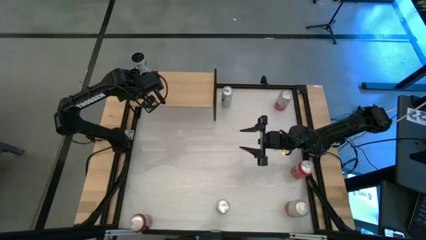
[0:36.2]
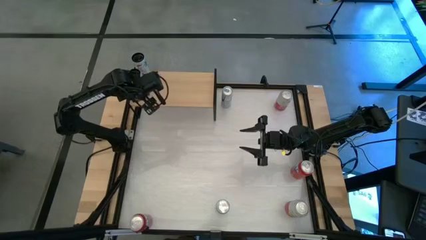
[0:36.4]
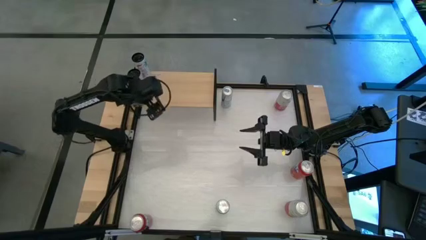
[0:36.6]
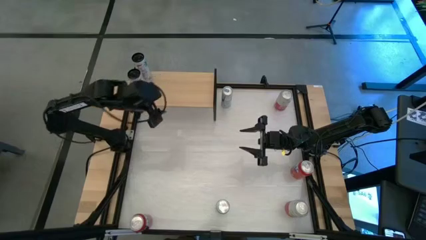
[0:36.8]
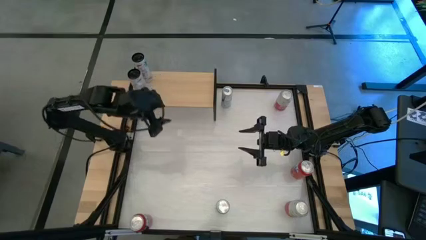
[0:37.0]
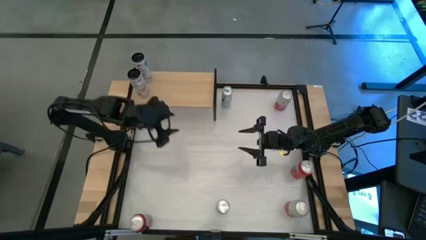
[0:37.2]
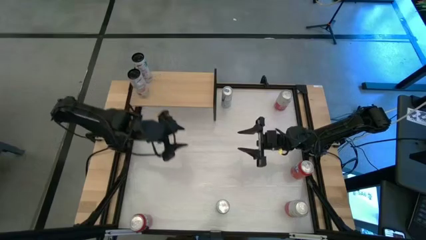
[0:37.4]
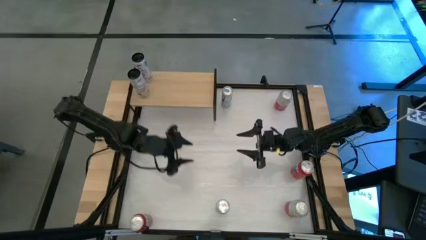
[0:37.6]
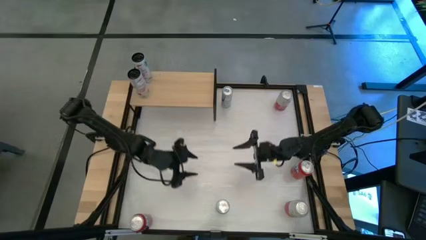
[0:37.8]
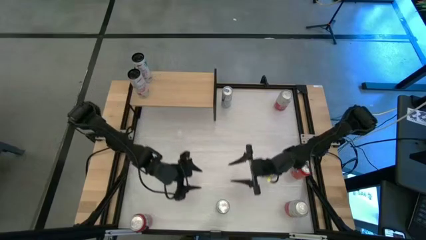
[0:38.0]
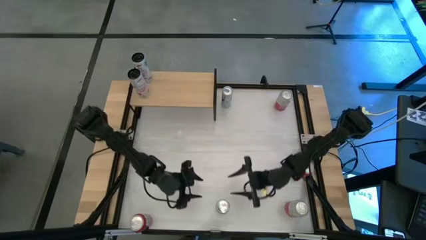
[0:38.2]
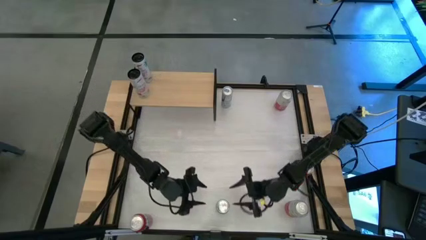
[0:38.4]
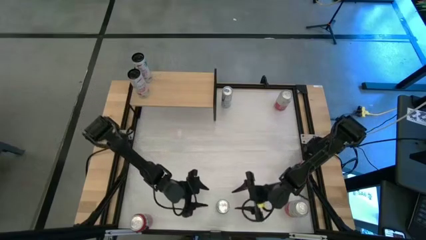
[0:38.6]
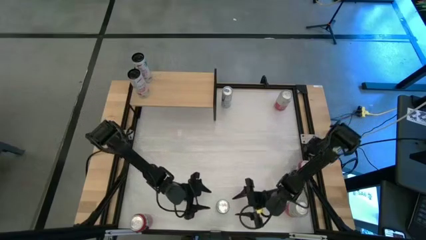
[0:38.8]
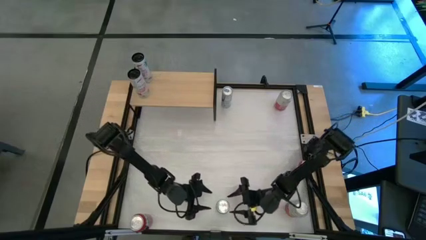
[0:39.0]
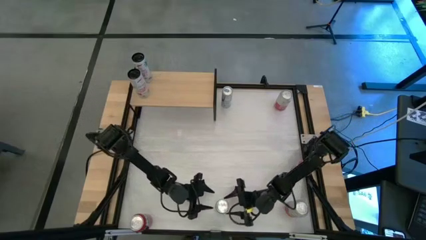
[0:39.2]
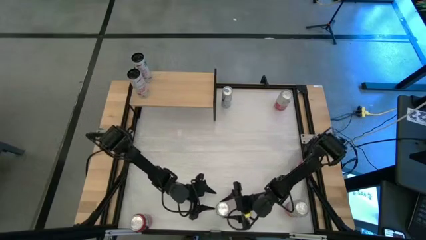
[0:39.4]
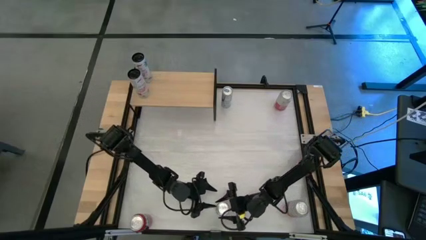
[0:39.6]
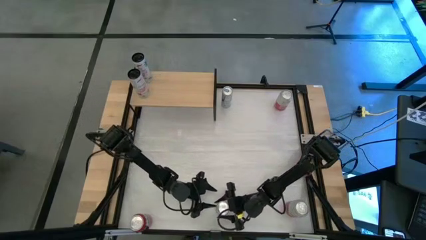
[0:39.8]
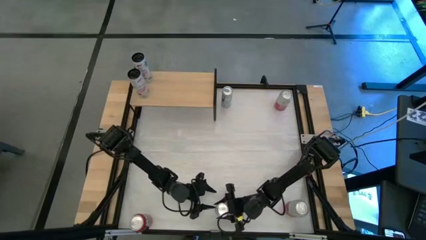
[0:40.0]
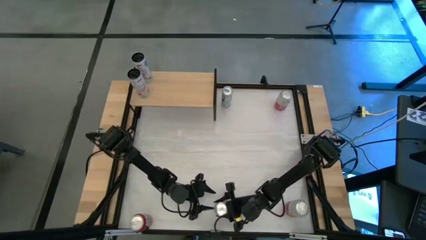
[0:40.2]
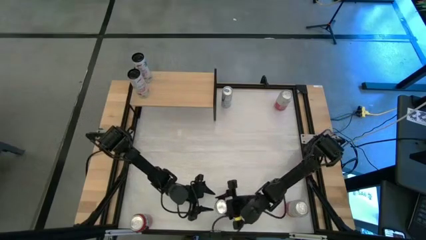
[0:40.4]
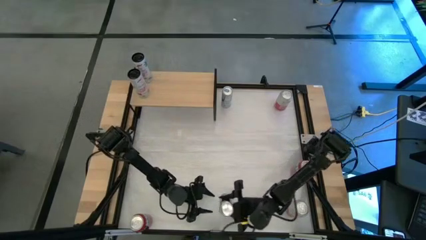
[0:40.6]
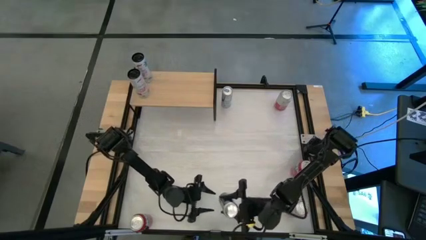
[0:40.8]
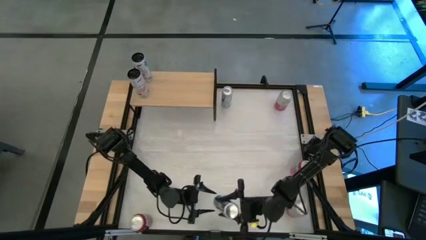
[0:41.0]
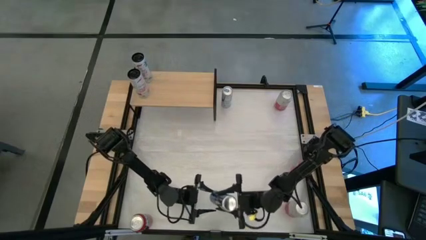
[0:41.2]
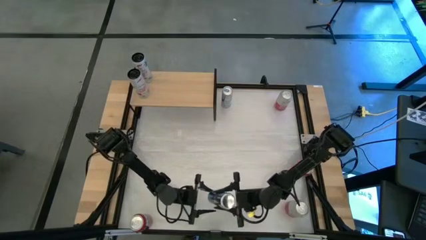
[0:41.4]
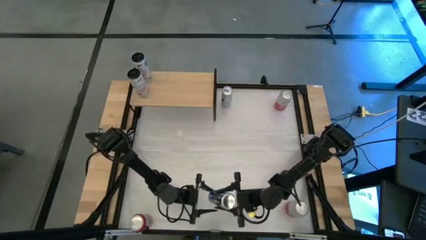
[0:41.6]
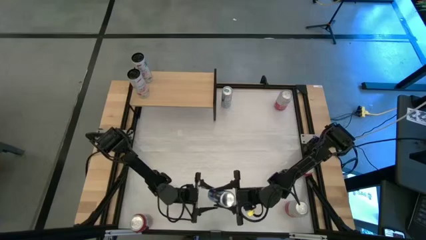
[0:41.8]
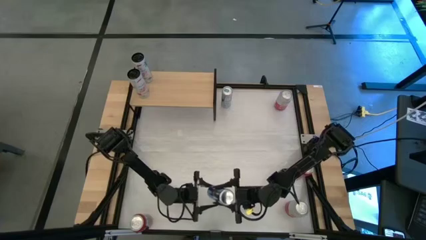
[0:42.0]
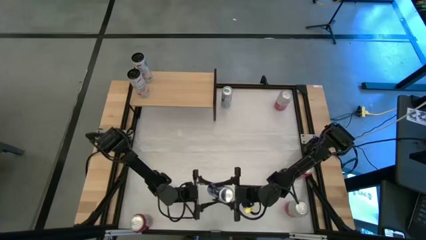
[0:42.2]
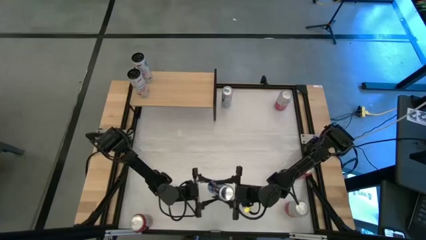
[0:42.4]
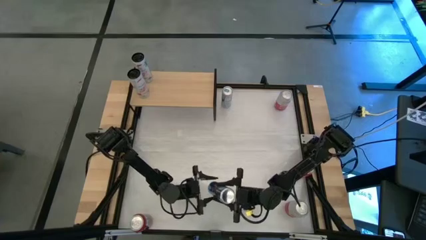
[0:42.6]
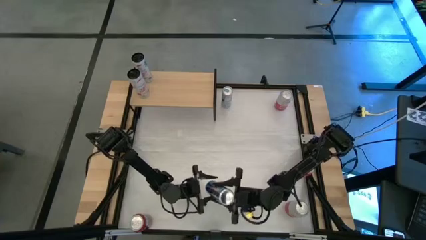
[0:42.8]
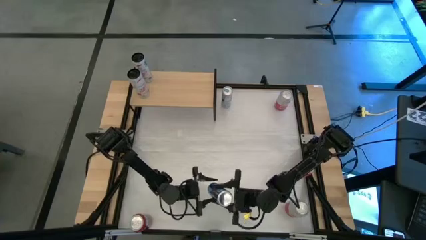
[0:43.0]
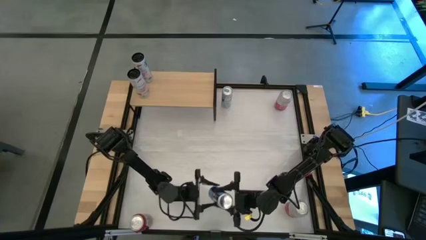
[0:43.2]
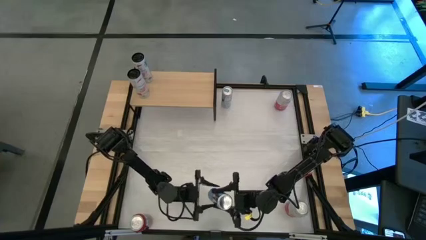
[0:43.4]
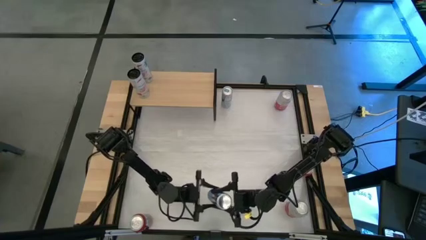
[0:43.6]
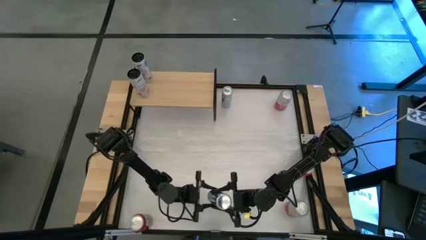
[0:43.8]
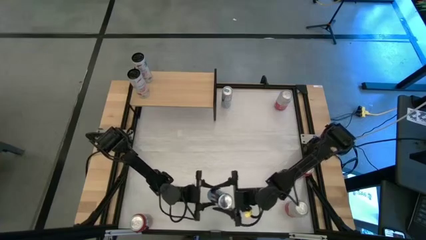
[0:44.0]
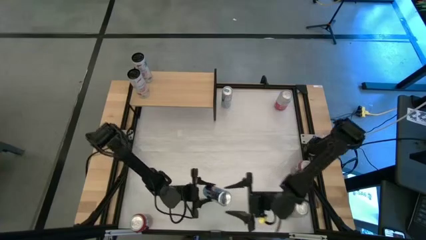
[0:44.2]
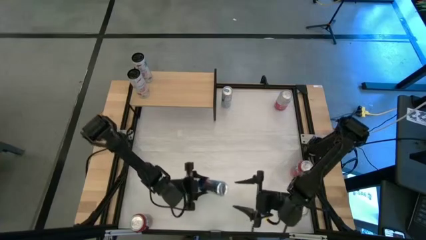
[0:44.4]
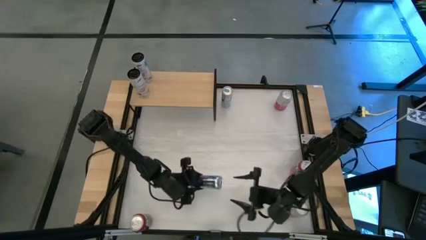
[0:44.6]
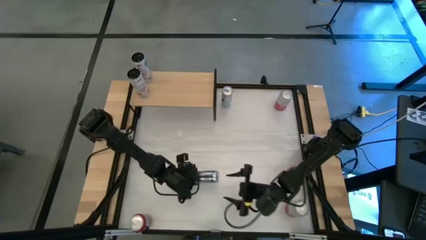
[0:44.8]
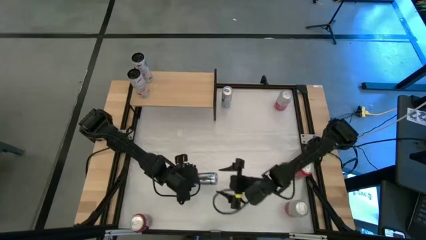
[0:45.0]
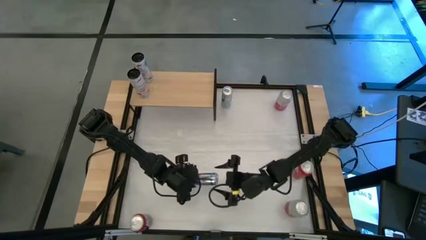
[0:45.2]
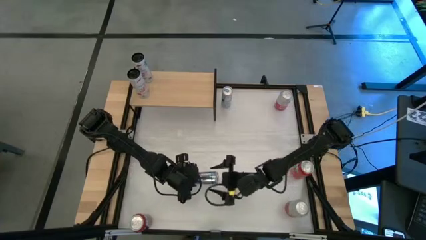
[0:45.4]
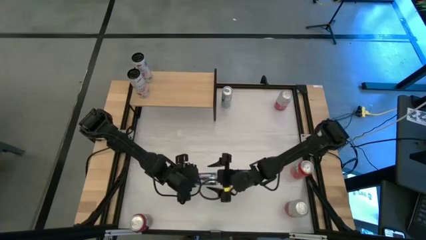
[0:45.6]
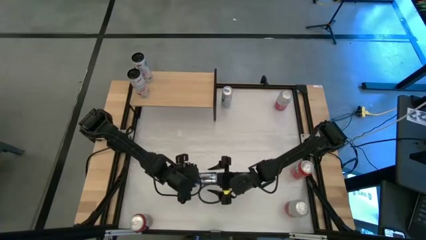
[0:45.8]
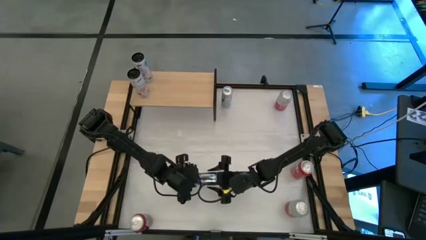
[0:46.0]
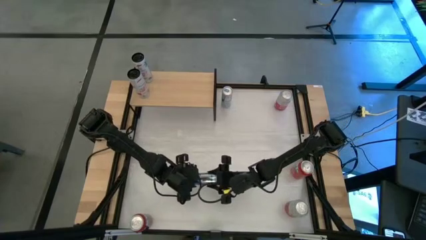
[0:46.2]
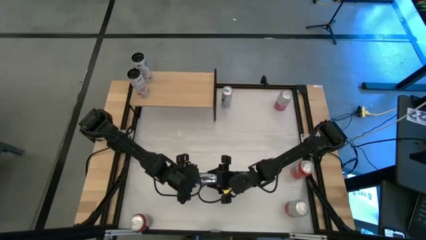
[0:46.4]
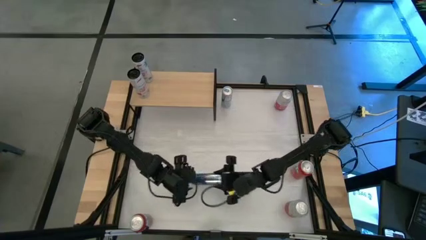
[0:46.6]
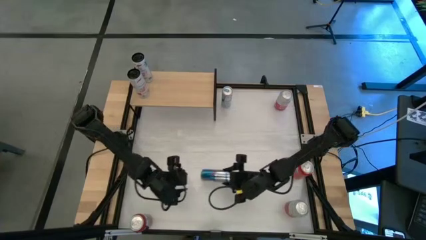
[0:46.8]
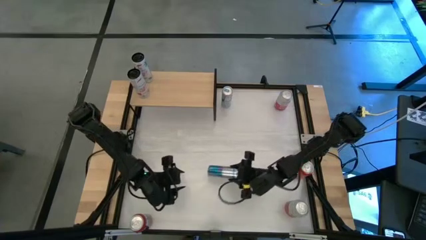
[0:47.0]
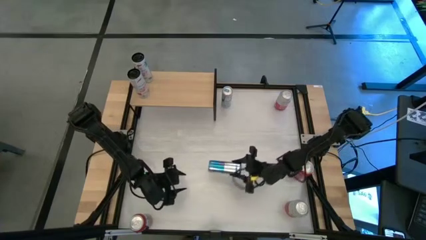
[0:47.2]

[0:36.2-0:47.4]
Task: Place canned beverage on shelf
Put the bottom blue soda can on the shelf

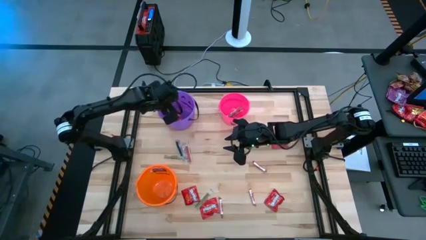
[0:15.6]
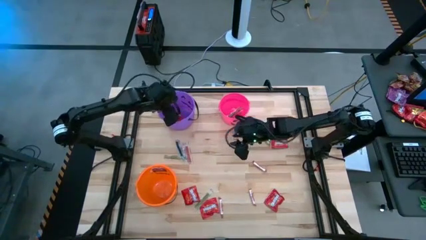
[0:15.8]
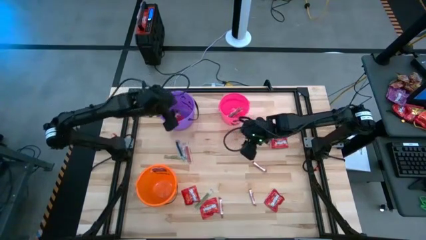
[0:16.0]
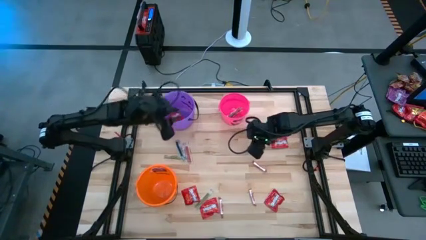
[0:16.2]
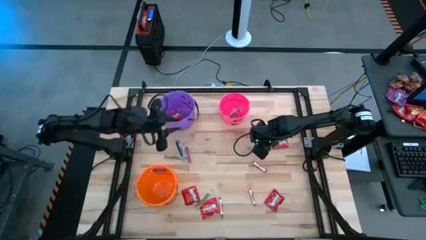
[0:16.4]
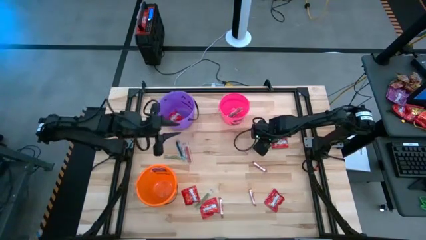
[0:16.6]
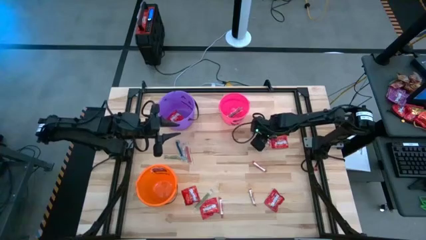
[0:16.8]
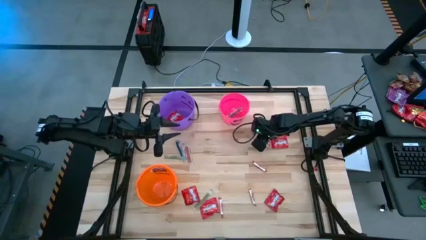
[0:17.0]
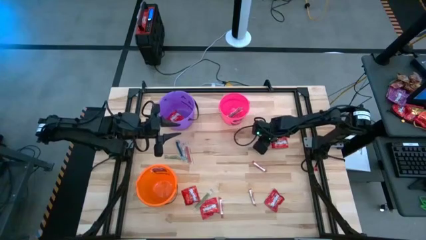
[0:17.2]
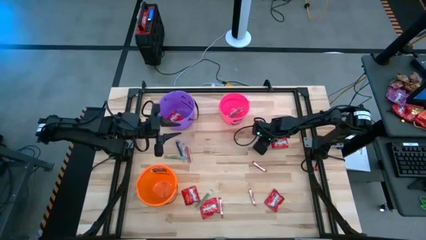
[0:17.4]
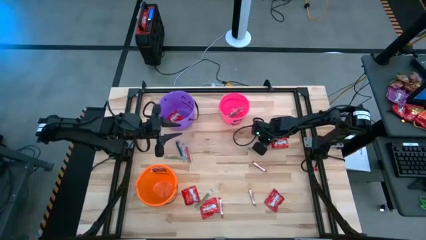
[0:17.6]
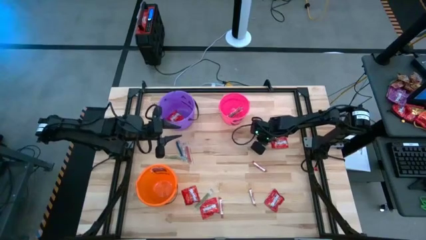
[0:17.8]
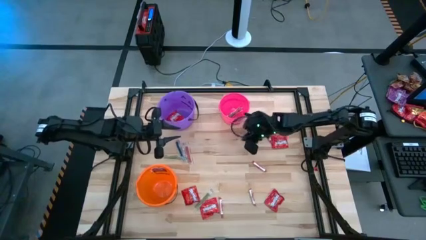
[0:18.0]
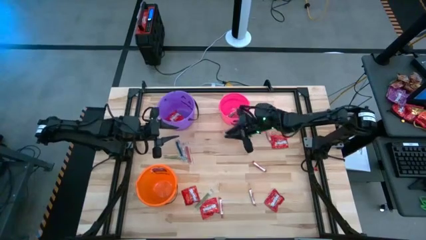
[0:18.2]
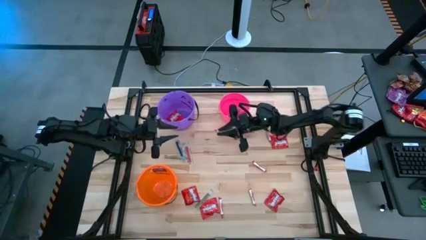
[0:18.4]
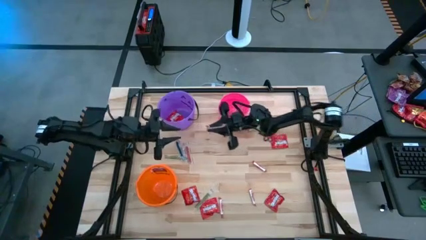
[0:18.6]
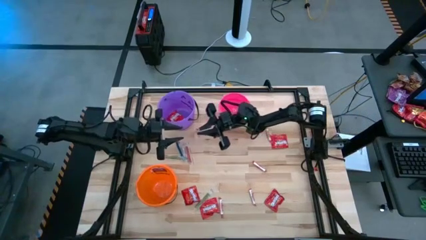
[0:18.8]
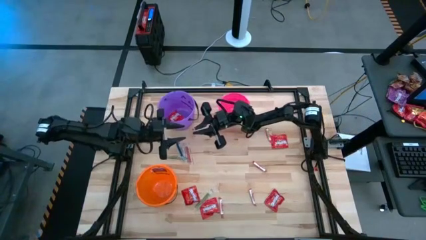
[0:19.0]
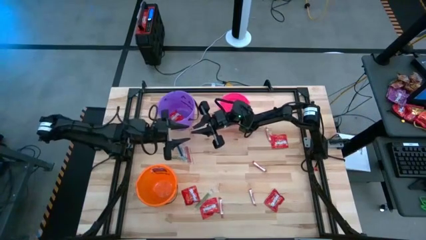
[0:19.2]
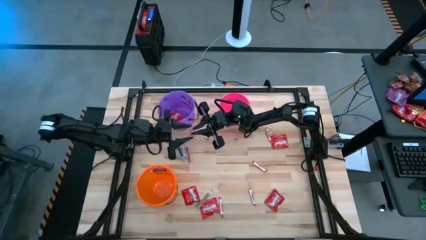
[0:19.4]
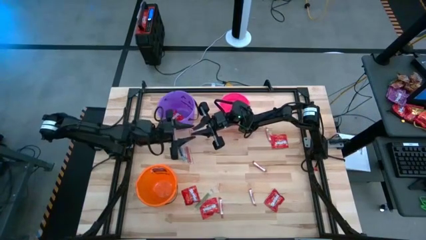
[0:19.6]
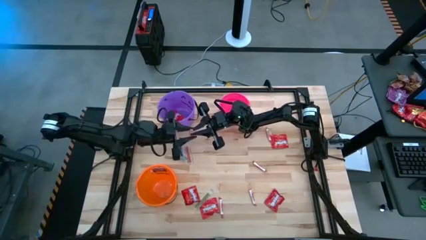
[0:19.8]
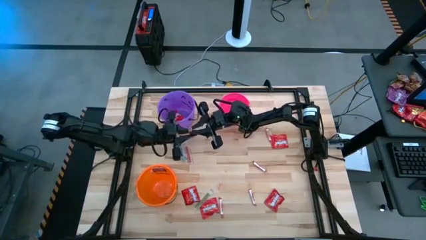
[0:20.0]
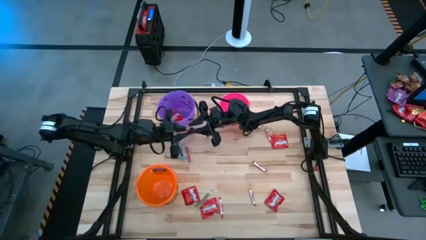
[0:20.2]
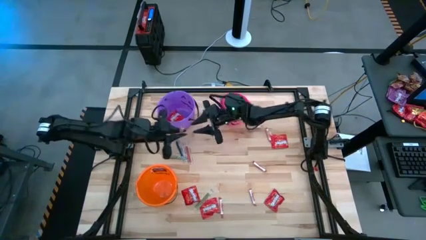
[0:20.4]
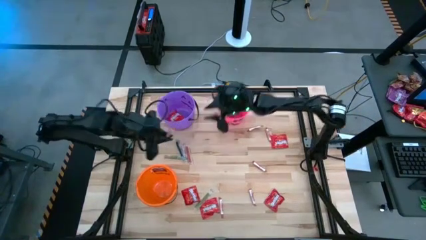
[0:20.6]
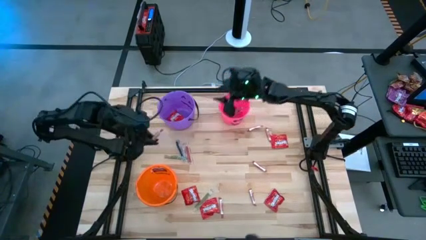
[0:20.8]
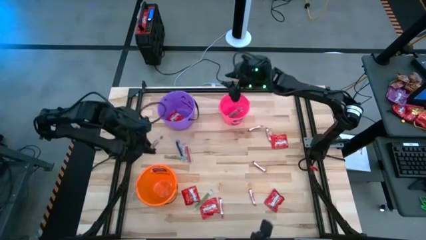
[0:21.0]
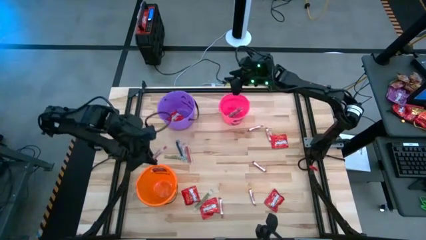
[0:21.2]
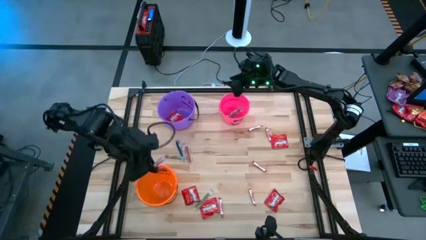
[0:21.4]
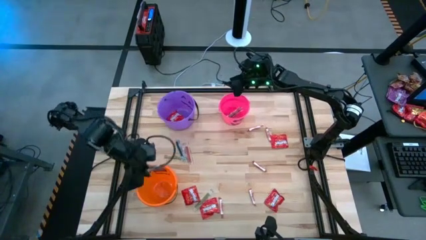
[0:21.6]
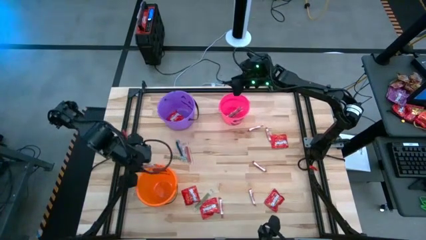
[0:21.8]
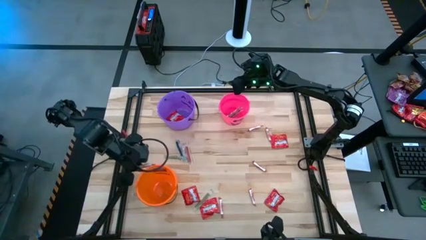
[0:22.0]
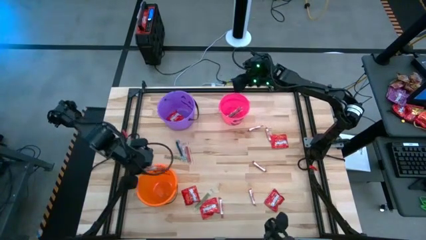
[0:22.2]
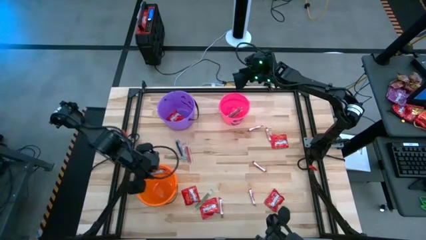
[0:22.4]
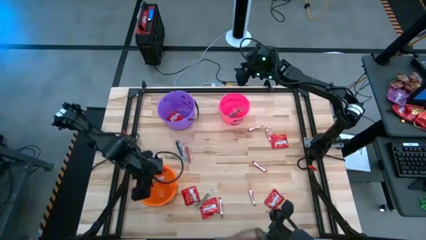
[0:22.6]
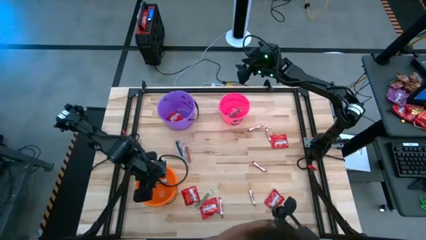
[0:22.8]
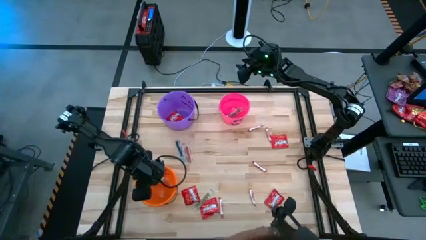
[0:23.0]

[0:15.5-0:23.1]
Task: Sort candy by brand, put in halloween buckets
Put the white candy into the orange bucket
